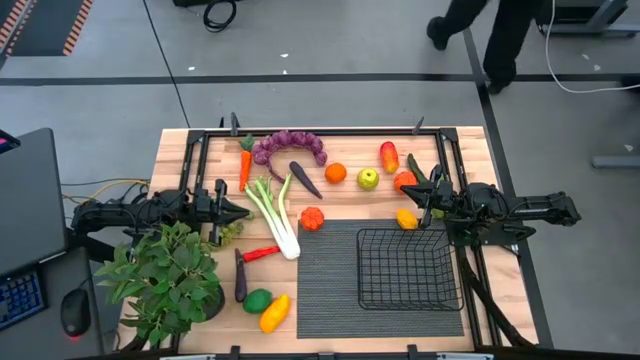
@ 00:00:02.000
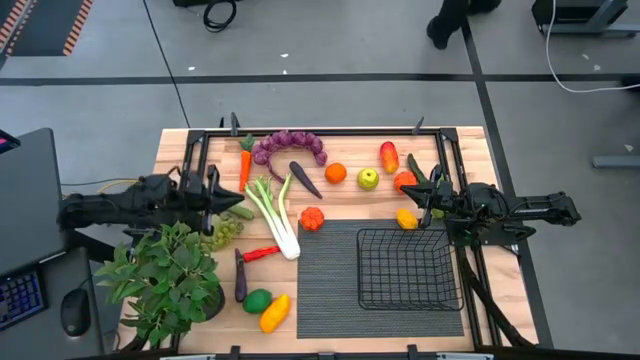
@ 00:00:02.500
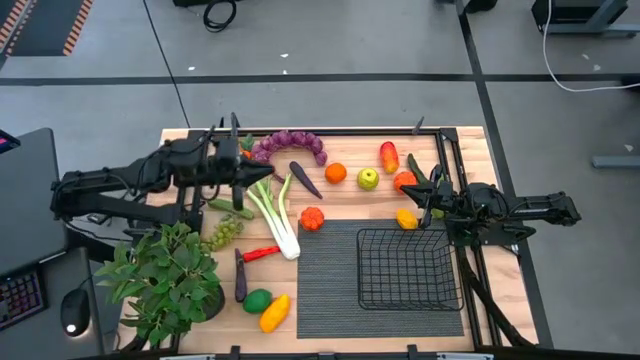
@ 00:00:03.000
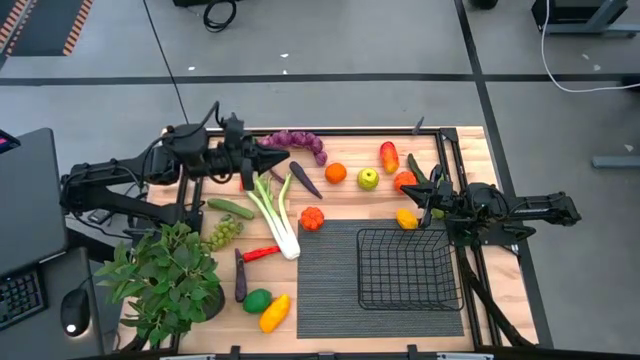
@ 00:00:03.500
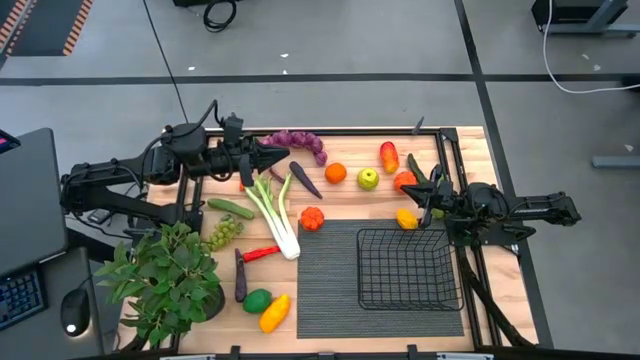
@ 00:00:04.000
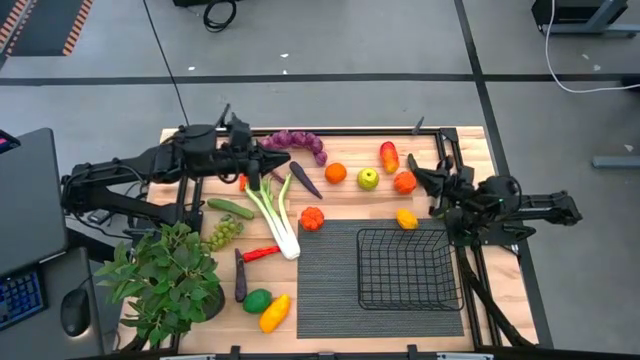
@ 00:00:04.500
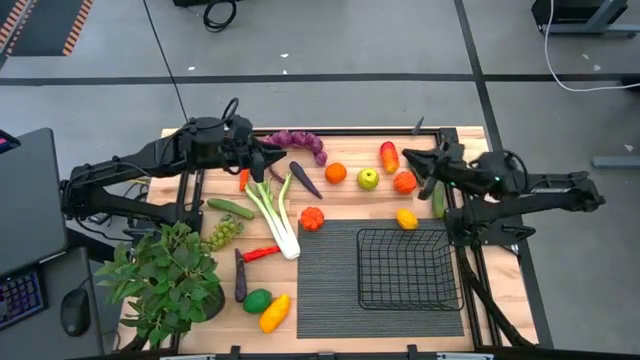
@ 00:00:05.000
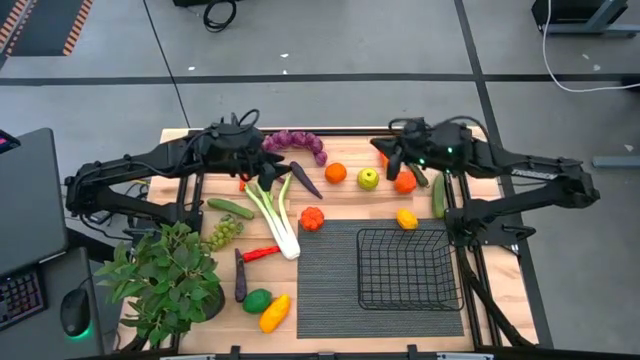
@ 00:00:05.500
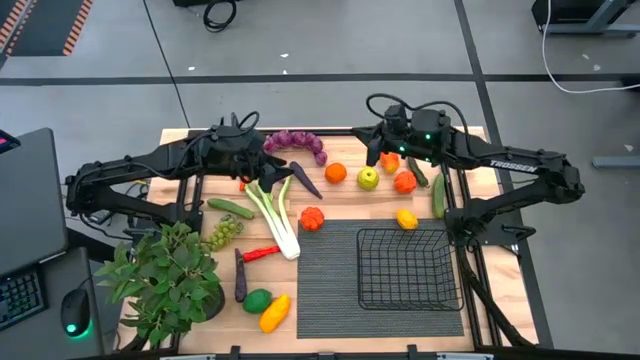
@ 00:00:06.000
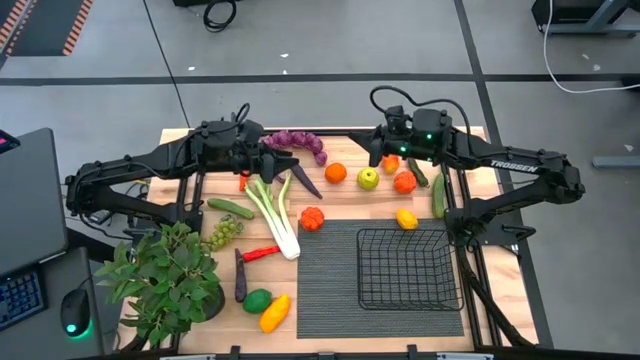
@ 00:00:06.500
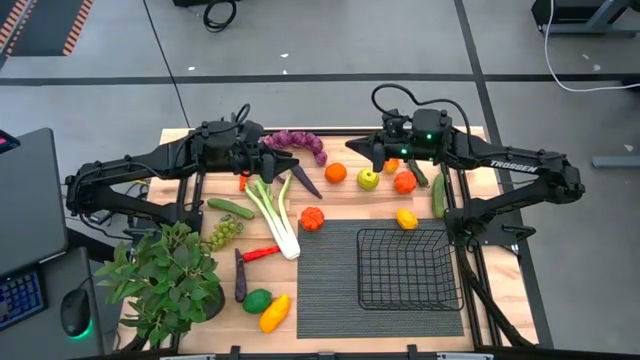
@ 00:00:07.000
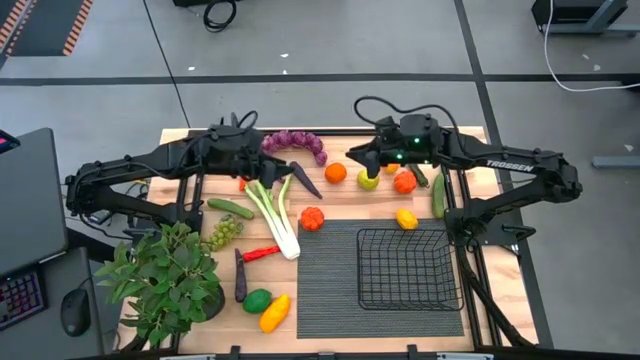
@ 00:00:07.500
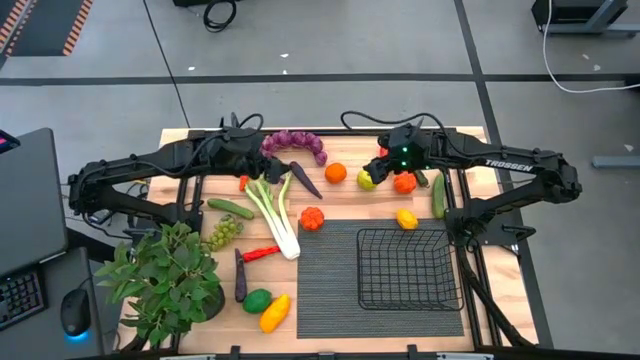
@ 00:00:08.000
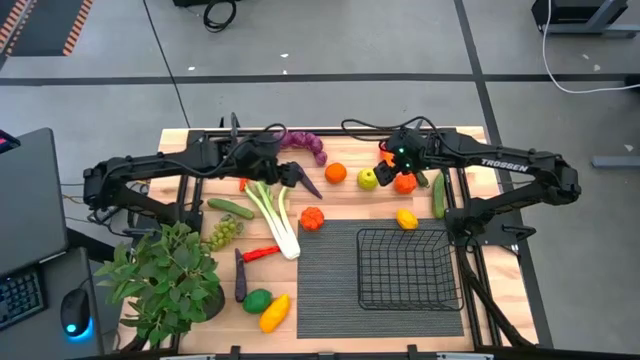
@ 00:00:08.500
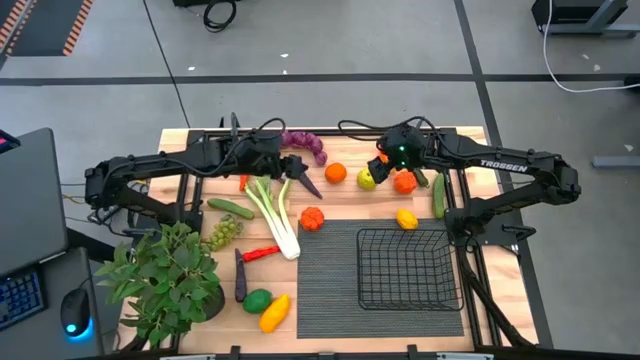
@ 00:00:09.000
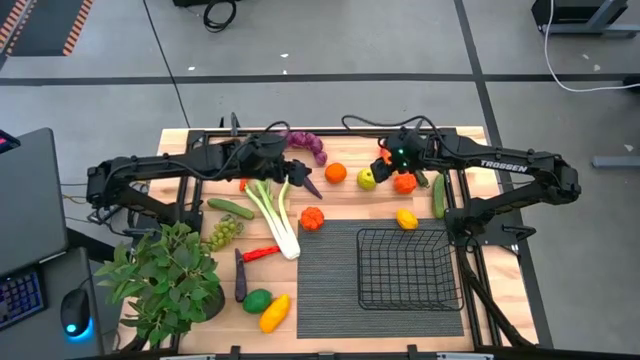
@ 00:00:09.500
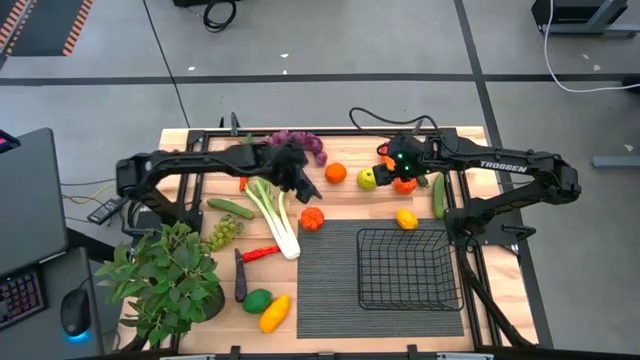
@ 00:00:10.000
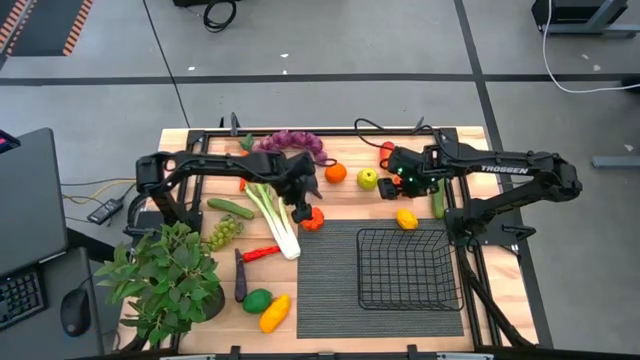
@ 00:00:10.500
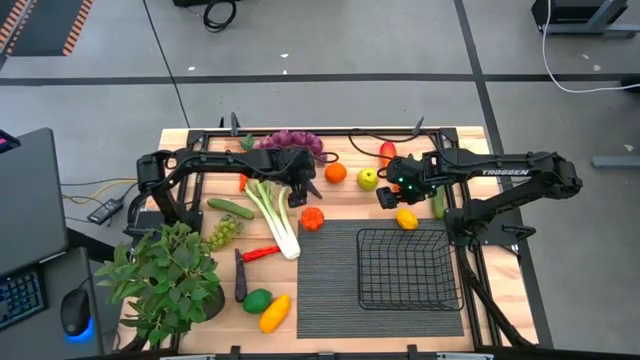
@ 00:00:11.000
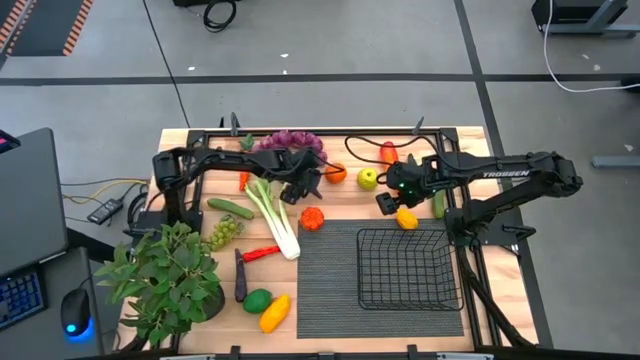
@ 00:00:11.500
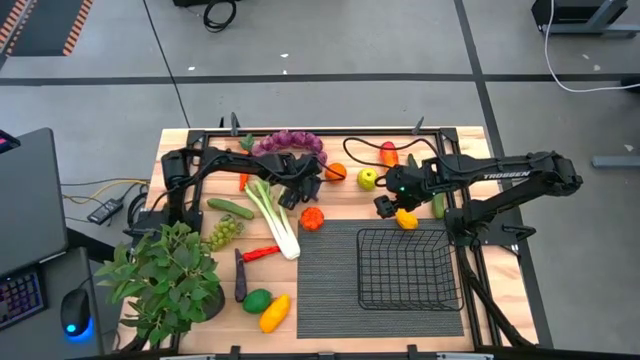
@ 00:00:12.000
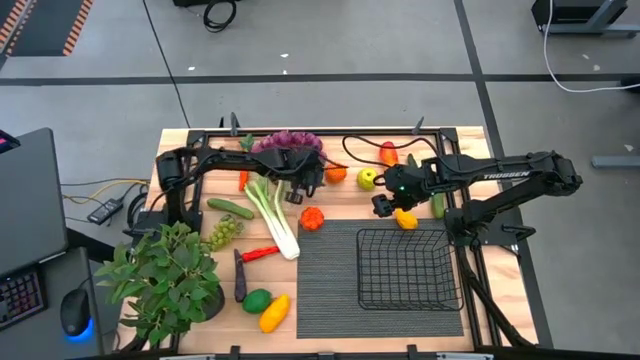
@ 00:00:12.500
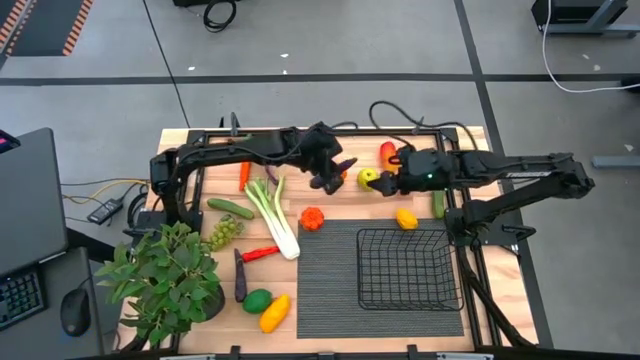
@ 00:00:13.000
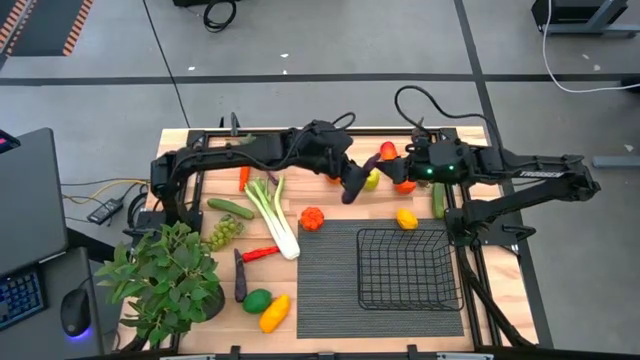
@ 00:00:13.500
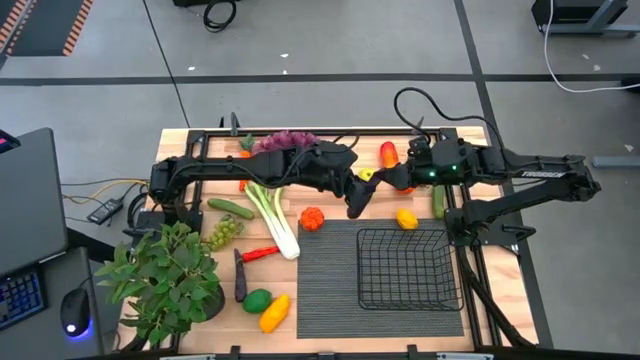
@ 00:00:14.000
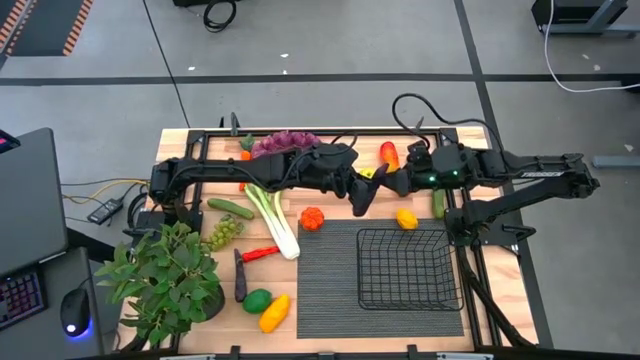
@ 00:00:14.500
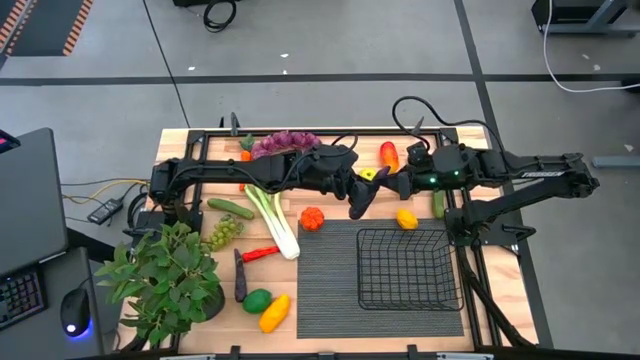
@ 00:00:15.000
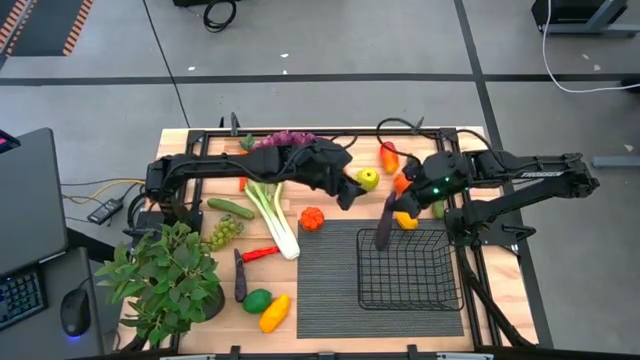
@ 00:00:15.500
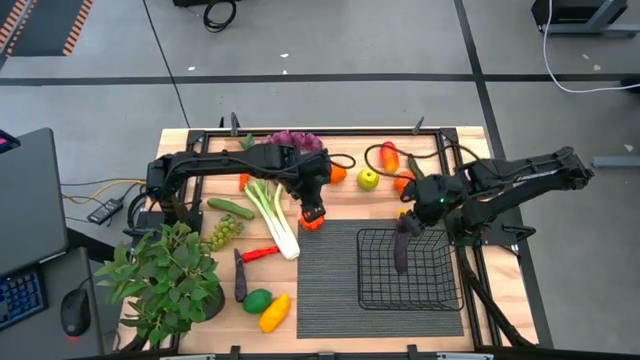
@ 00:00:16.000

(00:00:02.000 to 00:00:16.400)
Task: Build produce basket
Put the top eggplant into the wire basket

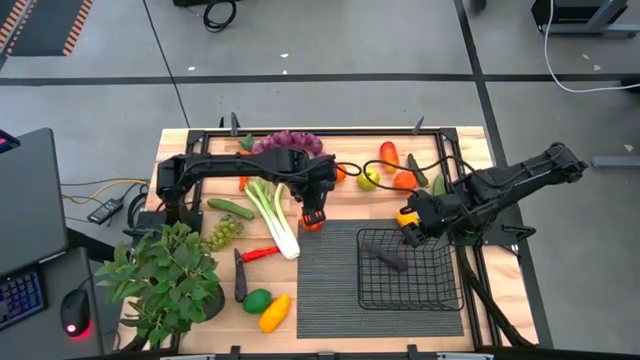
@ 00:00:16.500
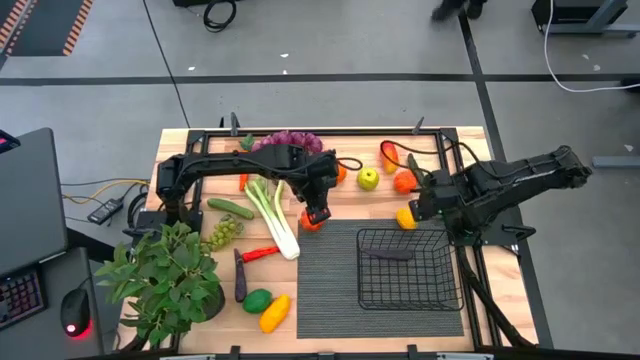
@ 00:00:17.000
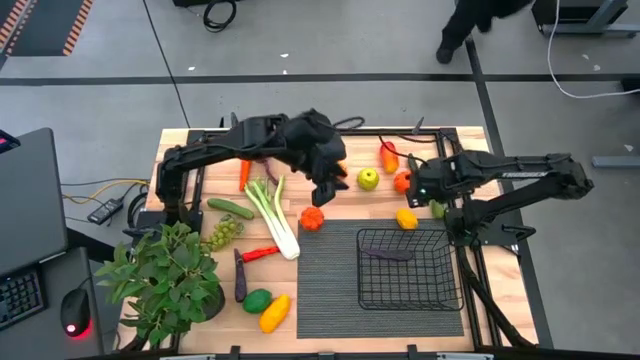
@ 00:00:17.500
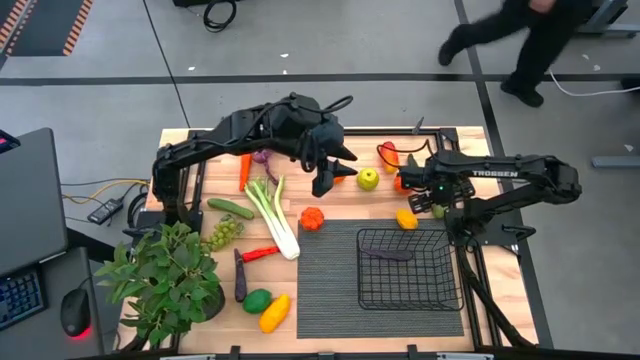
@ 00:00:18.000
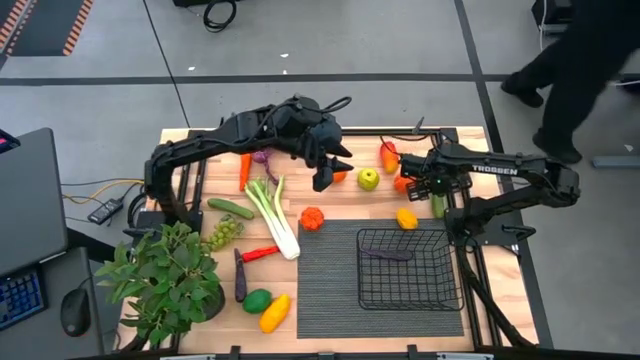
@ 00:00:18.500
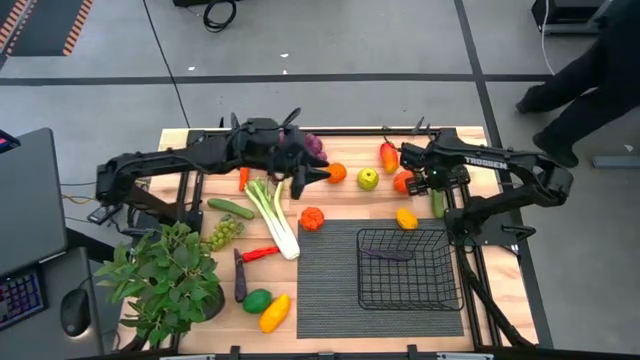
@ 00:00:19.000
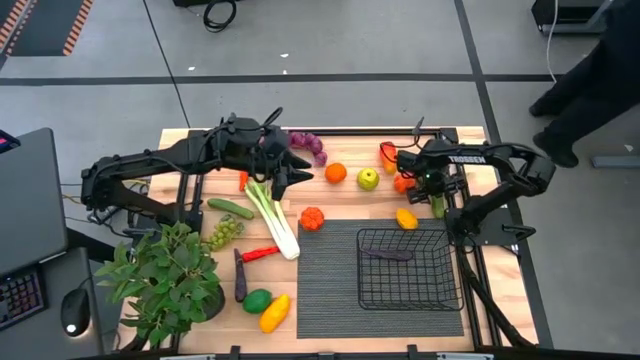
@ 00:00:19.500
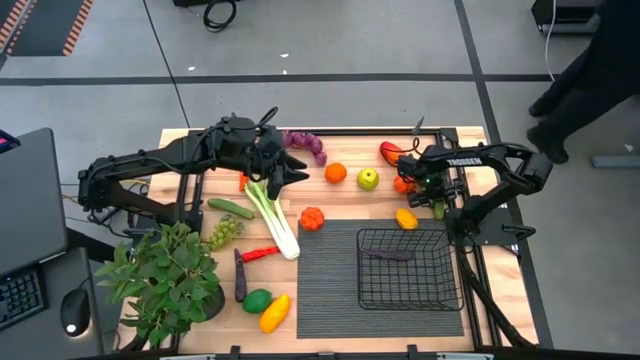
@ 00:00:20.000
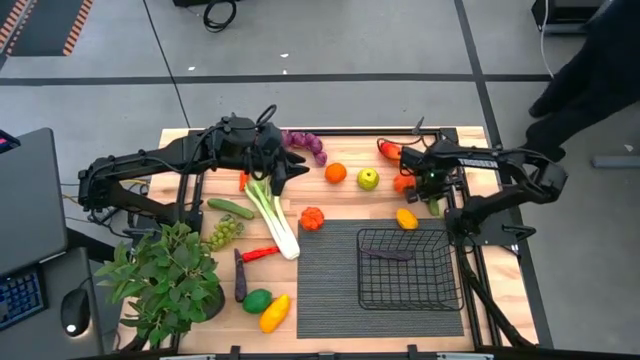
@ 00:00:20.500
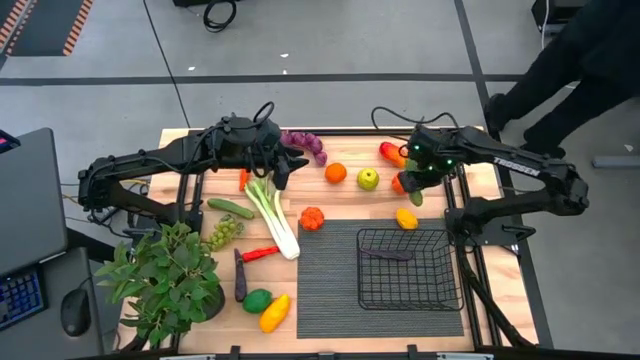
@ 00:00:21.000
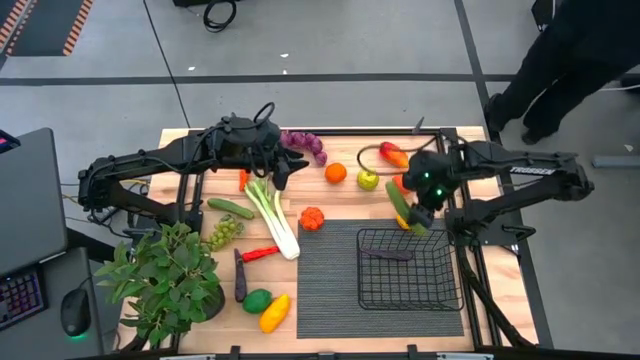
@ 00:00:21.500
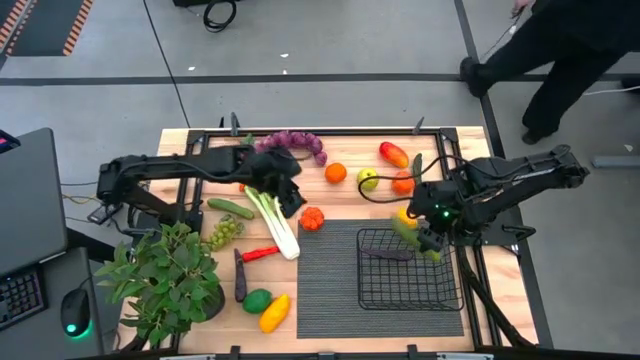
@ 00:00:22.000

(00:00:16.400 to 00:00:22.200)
Put the right cucumber into the wire basket
